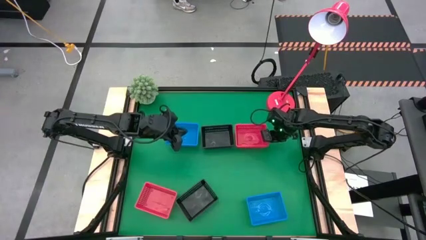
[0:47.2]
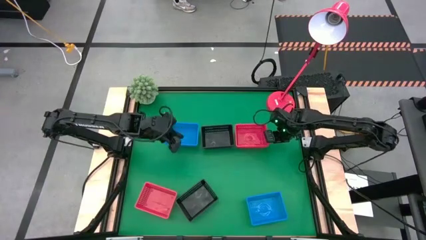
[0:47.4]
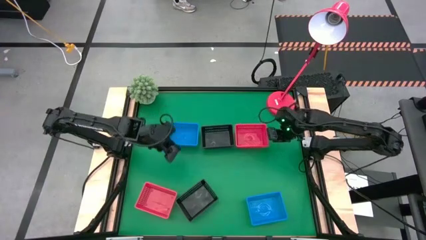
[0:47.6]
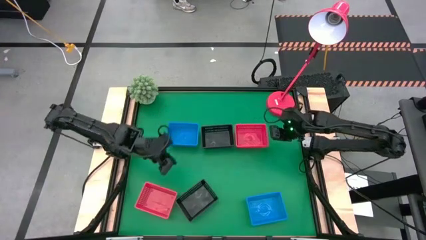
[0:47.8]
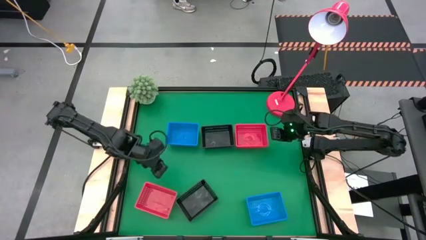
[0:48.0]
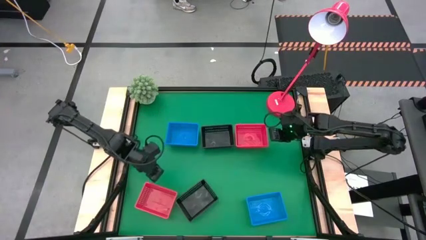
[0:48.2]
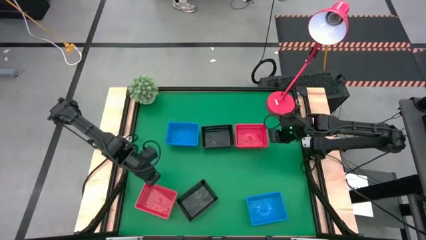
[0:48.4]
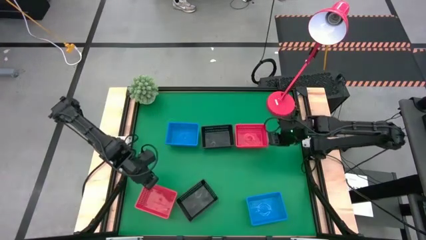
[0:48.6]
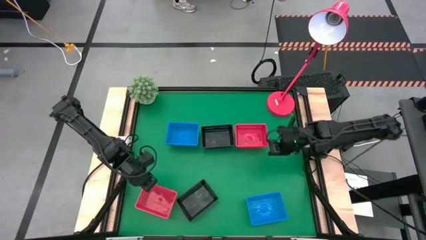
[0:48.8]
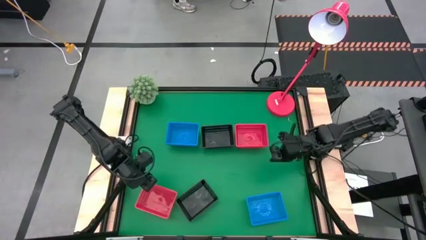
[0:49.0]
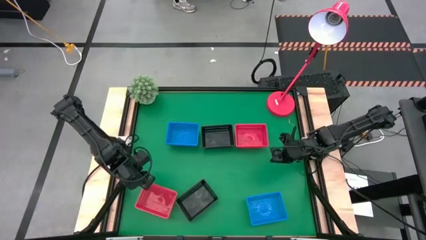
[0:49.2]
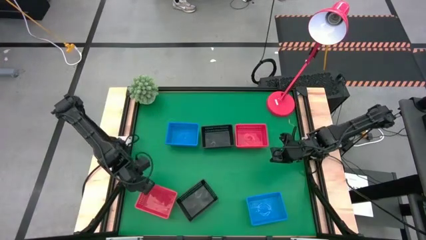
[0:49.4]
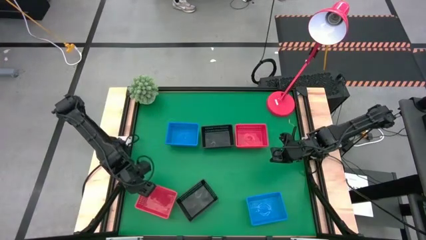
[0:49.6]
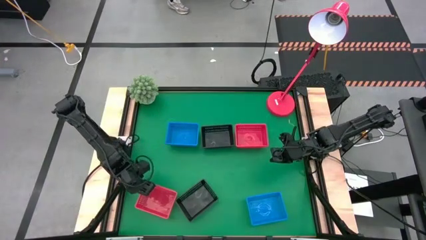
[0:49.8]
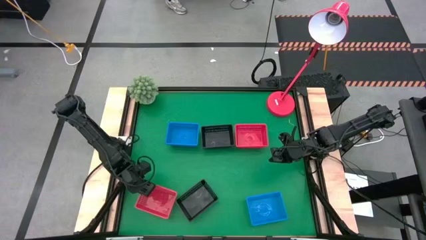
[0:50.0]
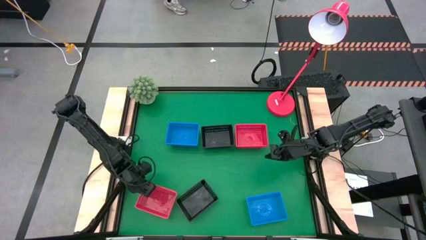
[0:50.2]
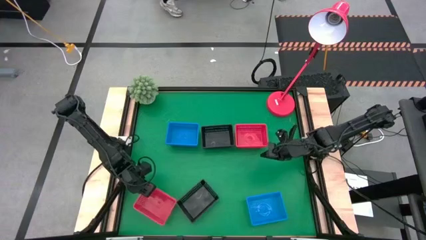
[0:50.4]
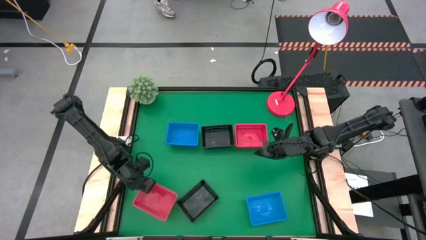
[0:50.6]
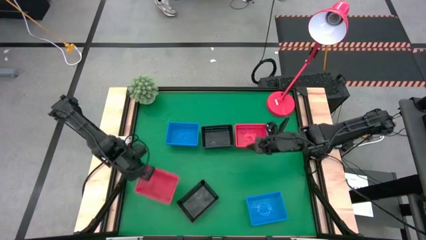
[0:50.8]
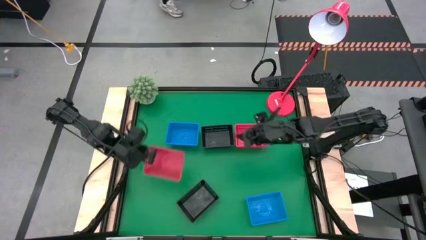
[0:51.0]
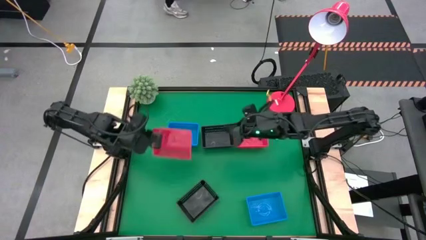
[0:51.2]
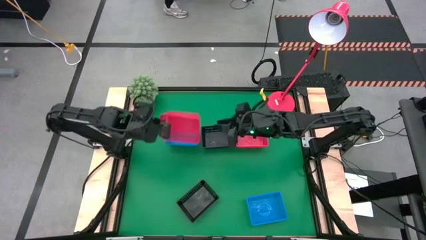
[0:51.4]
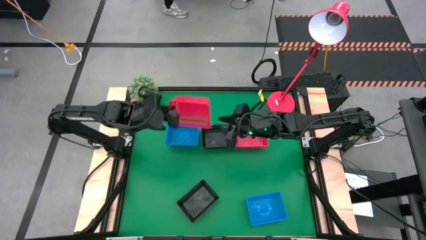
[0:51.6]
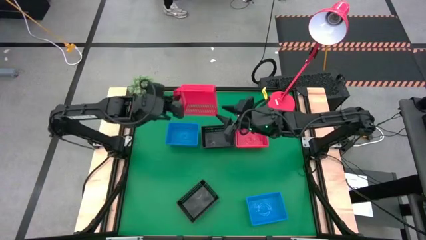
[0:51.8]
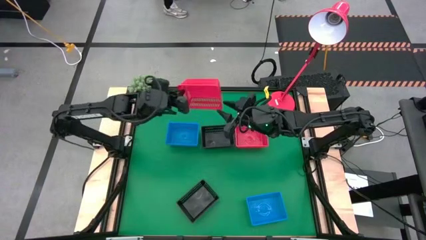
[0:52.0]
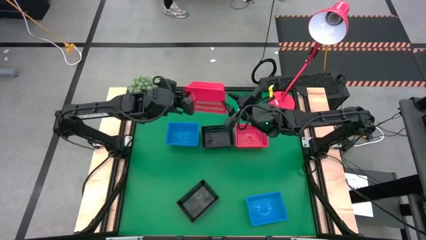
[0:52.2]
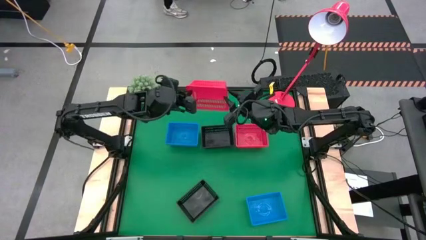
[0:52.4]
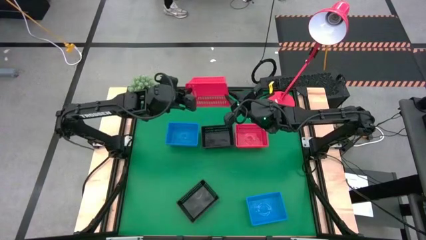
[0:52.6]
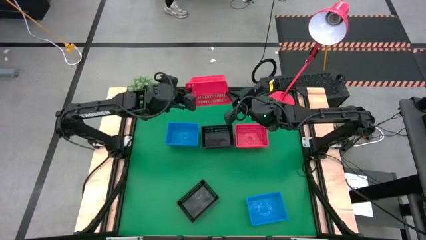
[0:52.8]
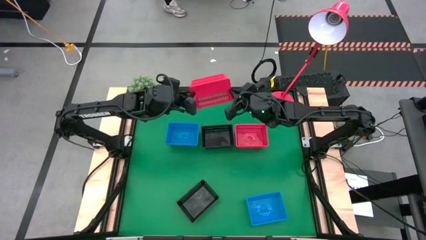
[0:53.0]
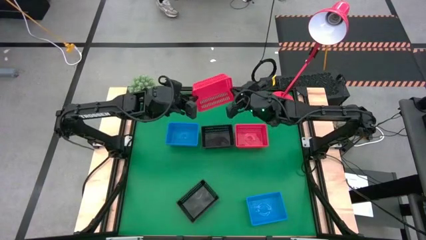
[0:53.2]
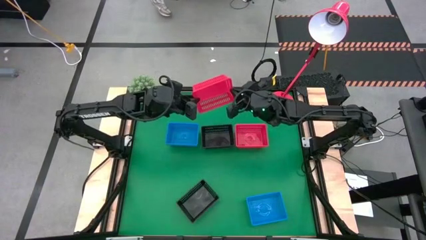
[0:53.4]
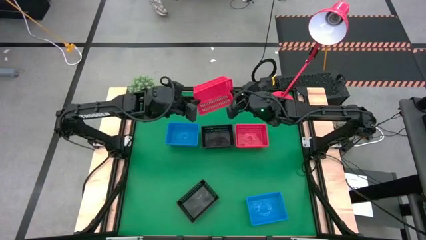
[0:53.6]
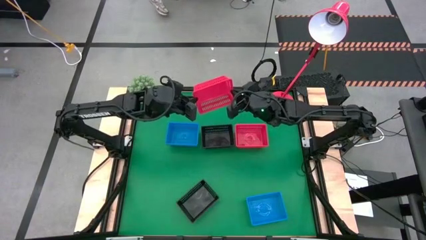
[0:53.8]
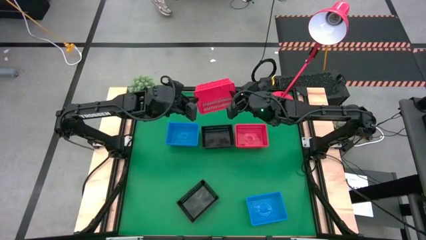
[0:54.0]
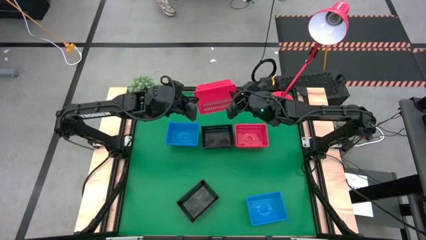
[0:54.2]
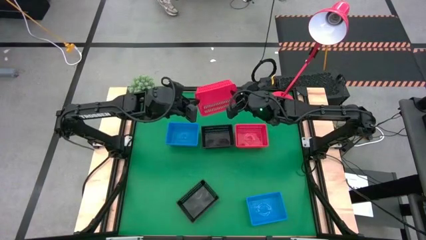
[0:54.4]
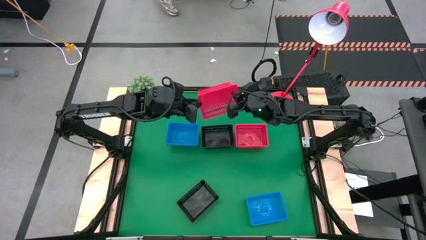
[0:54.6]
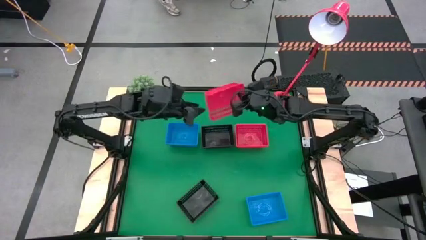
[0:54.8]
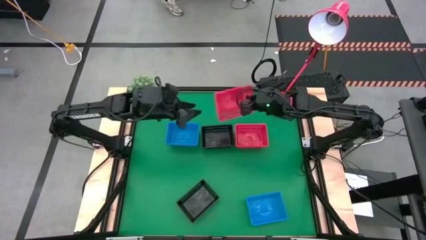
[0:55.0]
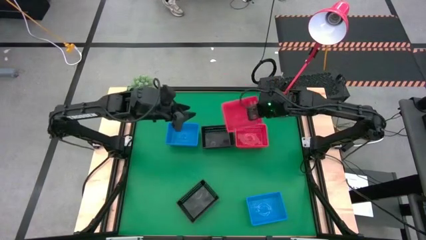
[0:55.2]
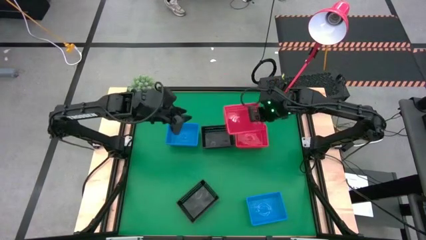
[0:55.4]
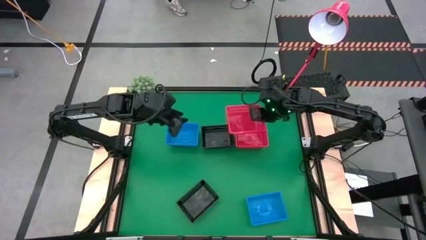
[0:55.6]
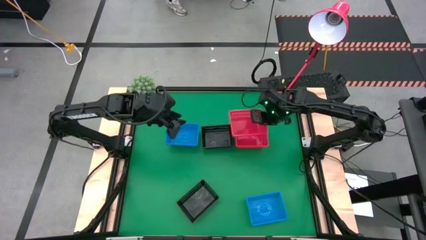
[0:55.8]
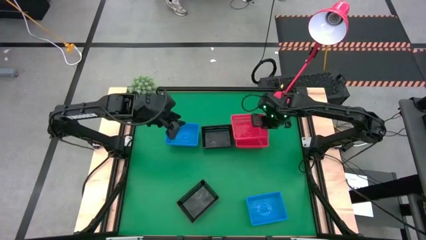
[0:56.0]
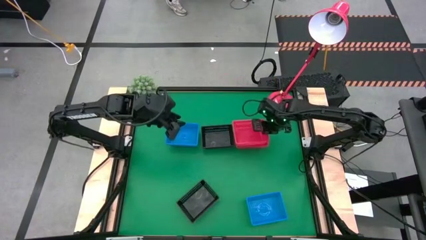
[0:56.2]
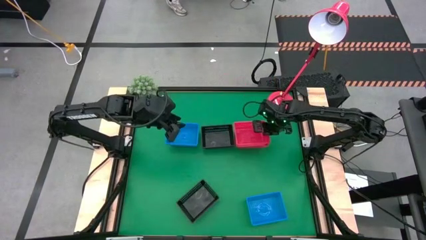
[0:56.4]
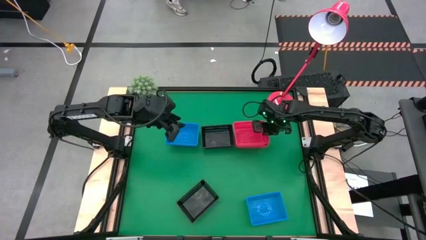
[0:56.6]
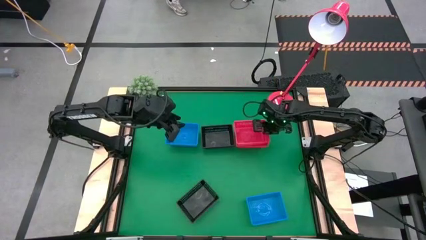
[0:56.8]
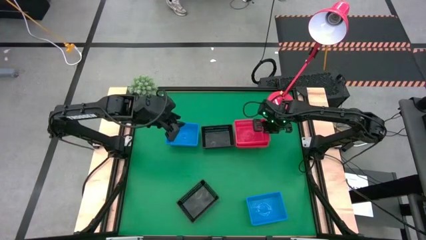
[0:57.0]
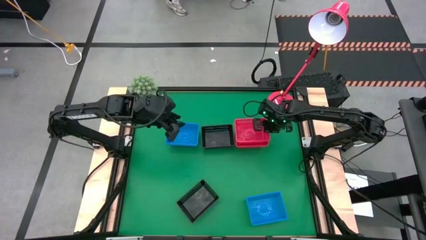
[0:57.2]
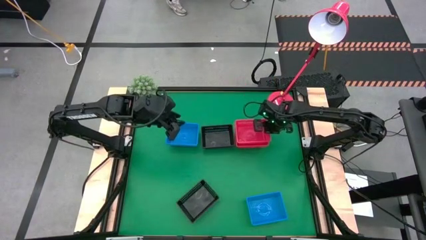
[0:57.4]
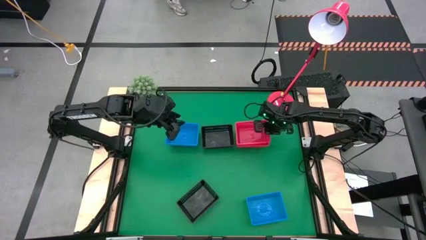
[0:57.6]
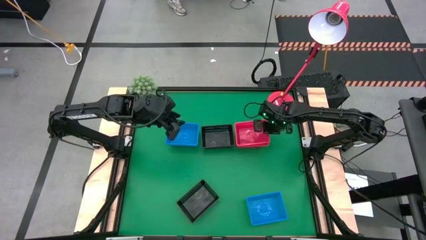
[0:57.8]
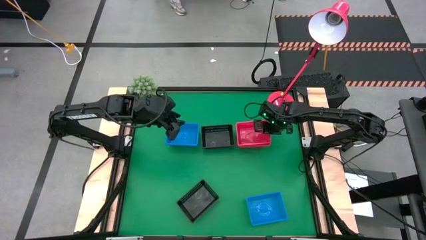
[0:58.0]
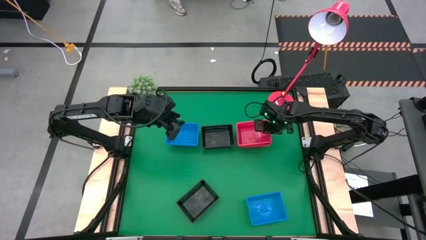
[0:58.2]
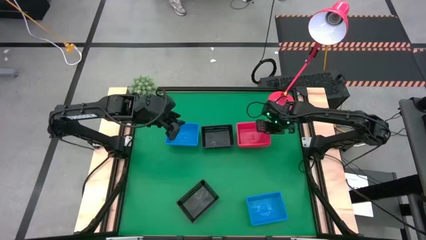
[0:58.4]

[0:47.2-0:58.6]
Stack the bottom orange bin on the top stacked orange bins
